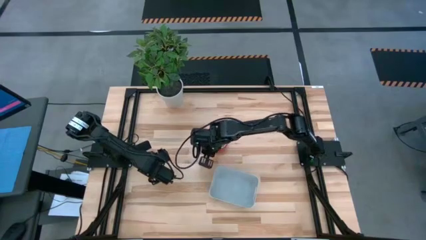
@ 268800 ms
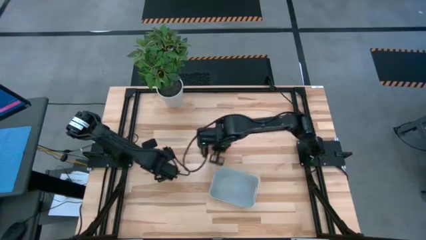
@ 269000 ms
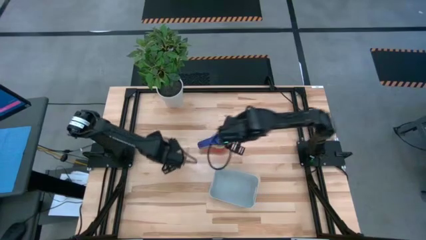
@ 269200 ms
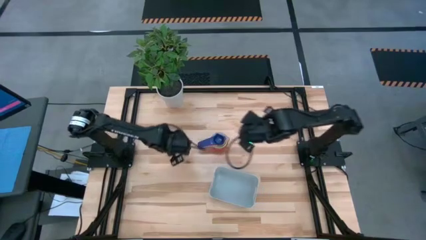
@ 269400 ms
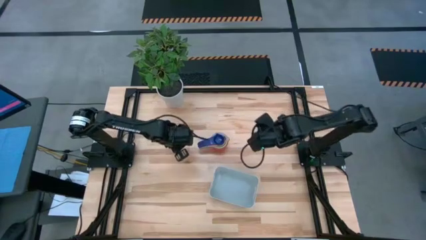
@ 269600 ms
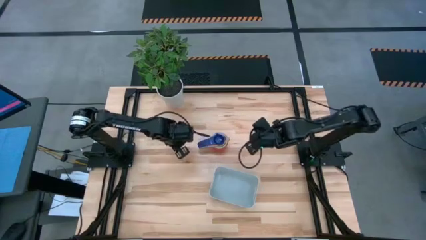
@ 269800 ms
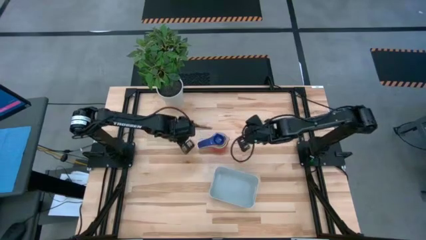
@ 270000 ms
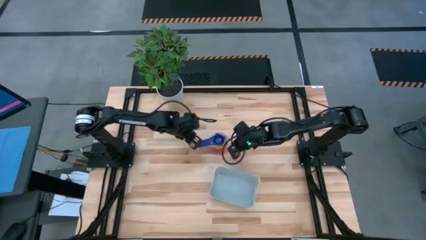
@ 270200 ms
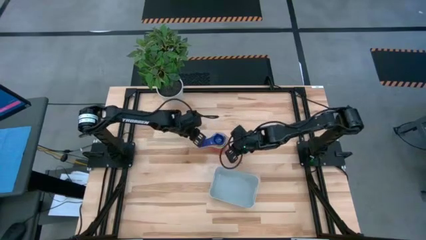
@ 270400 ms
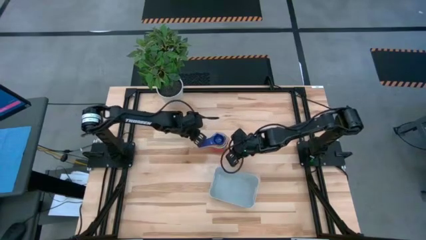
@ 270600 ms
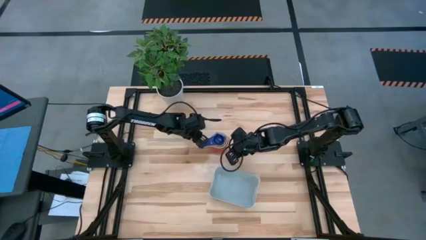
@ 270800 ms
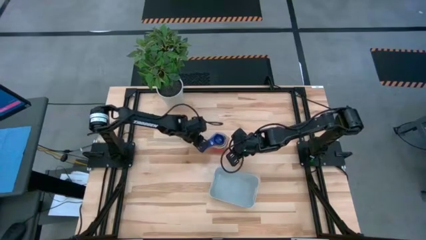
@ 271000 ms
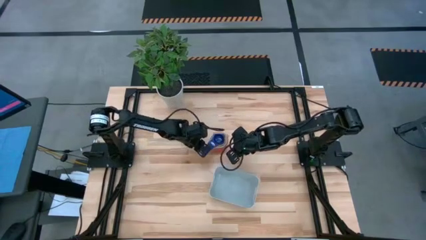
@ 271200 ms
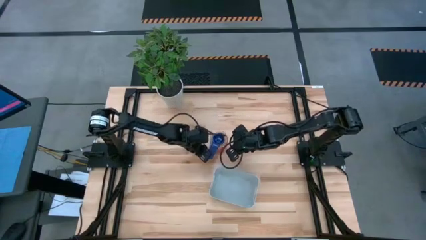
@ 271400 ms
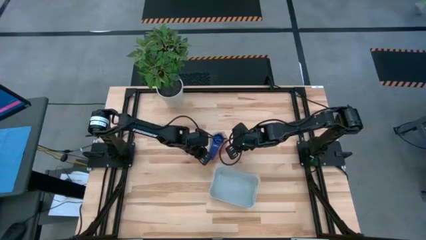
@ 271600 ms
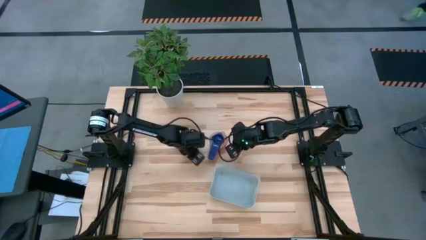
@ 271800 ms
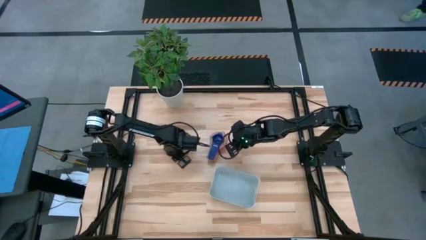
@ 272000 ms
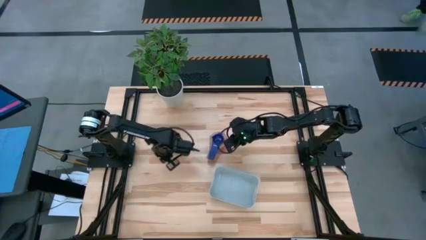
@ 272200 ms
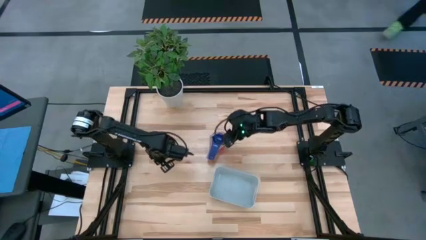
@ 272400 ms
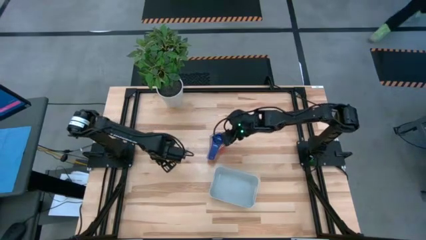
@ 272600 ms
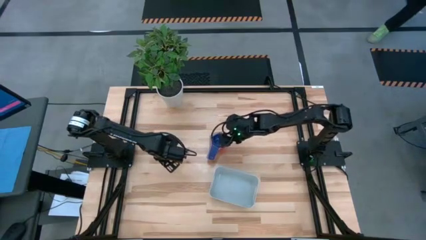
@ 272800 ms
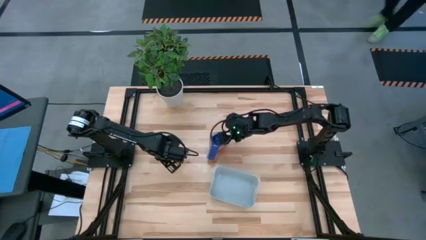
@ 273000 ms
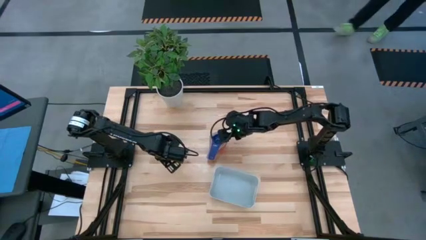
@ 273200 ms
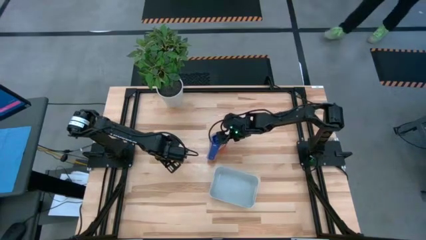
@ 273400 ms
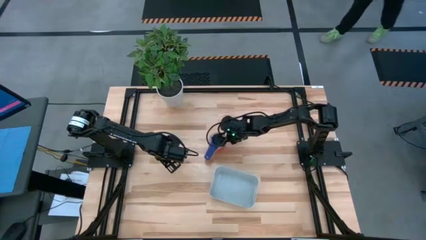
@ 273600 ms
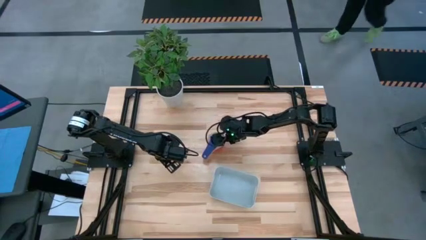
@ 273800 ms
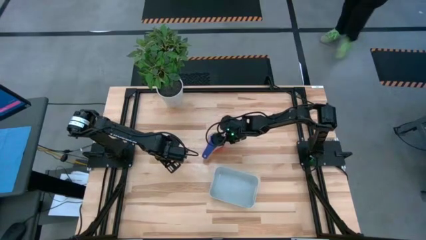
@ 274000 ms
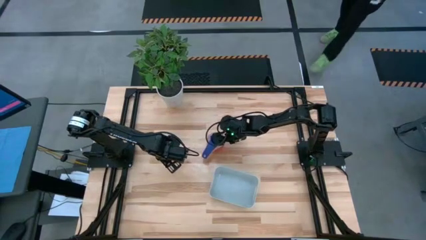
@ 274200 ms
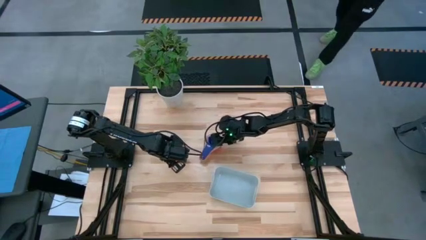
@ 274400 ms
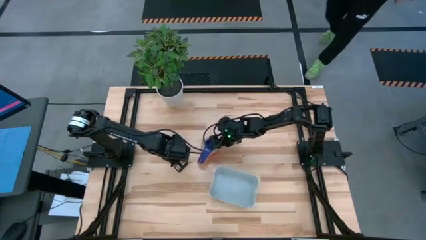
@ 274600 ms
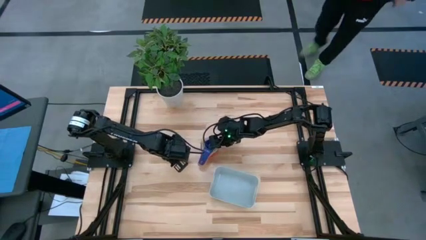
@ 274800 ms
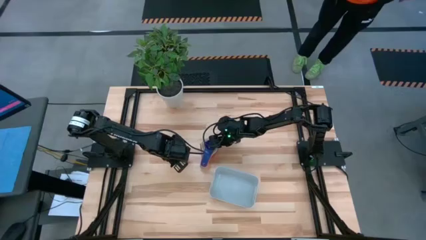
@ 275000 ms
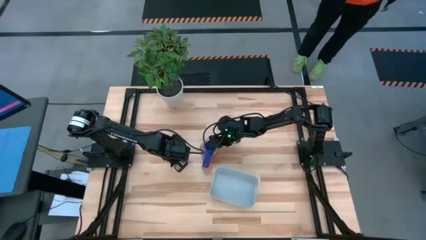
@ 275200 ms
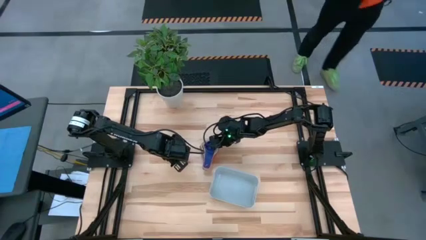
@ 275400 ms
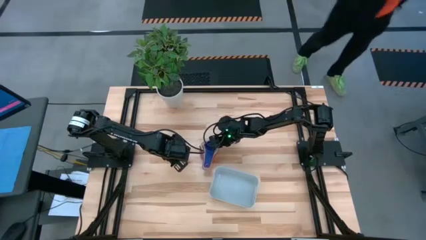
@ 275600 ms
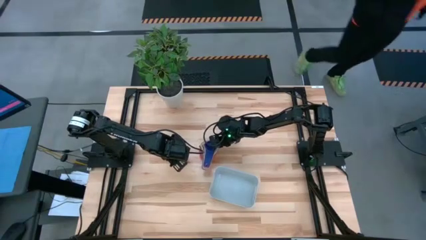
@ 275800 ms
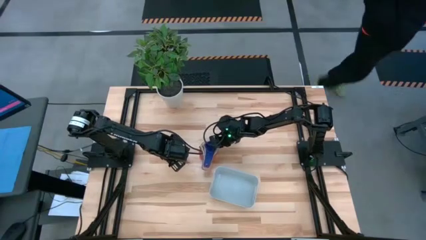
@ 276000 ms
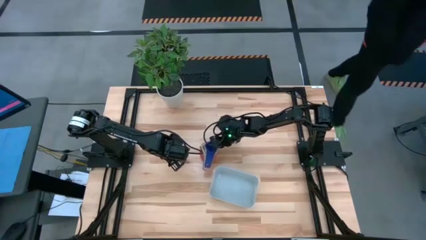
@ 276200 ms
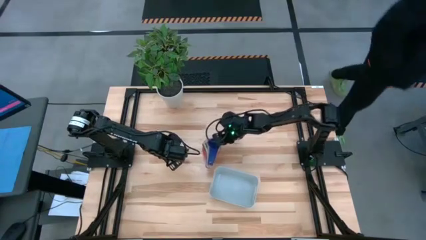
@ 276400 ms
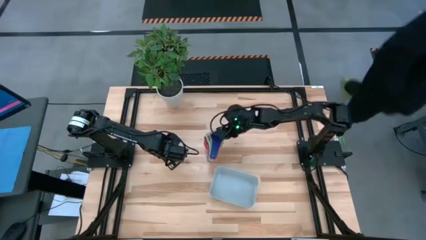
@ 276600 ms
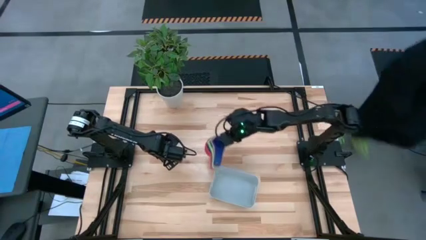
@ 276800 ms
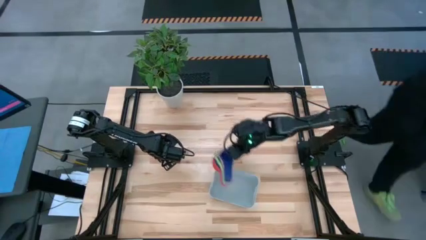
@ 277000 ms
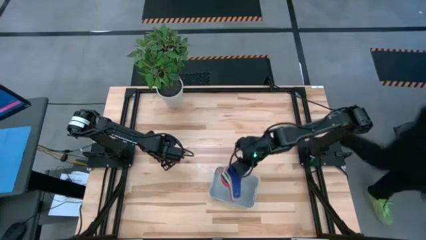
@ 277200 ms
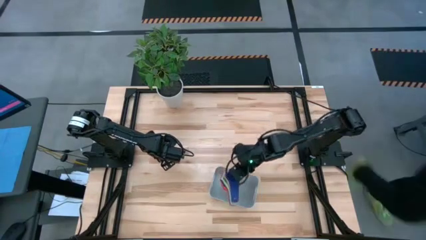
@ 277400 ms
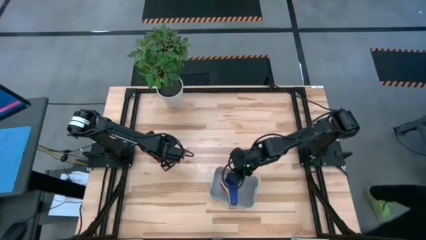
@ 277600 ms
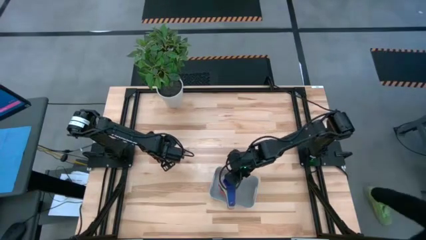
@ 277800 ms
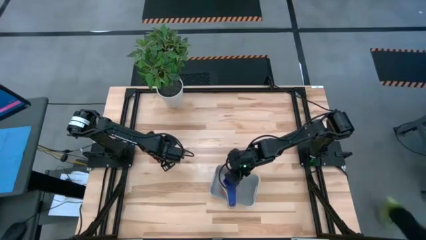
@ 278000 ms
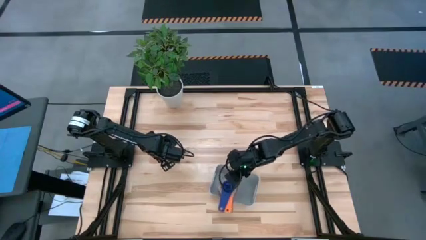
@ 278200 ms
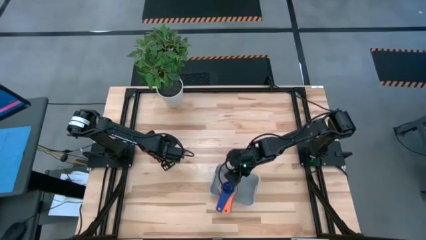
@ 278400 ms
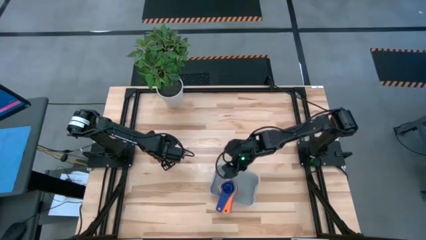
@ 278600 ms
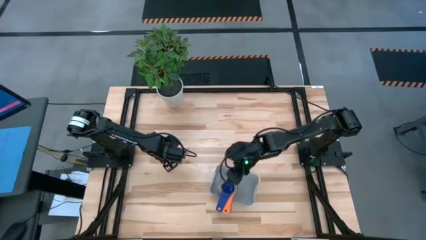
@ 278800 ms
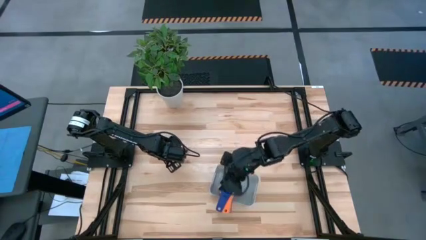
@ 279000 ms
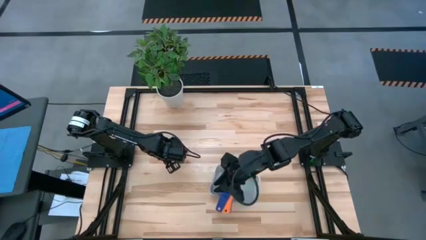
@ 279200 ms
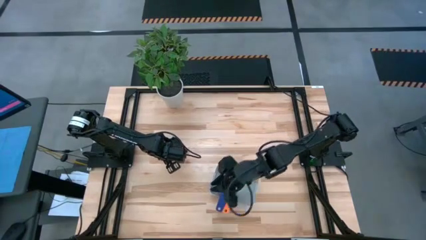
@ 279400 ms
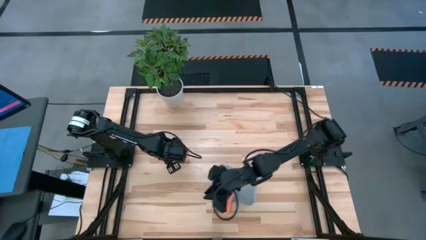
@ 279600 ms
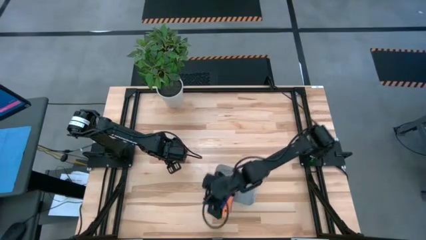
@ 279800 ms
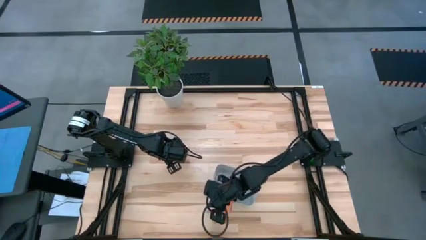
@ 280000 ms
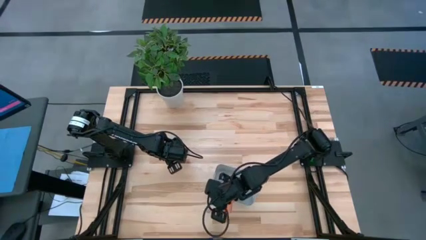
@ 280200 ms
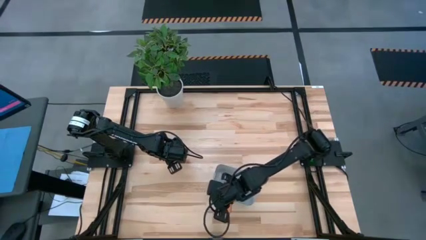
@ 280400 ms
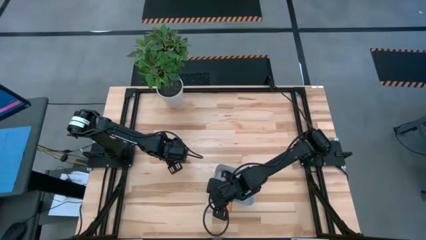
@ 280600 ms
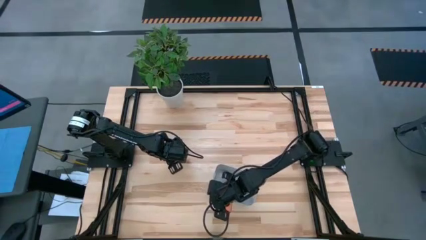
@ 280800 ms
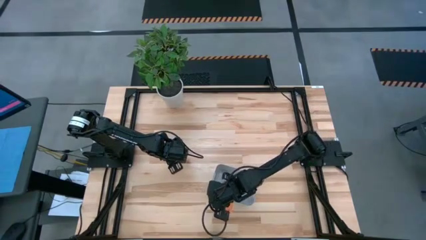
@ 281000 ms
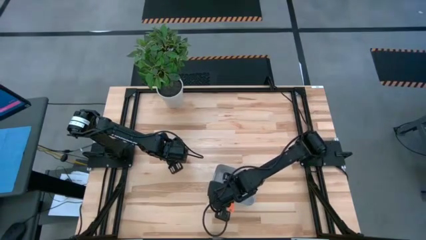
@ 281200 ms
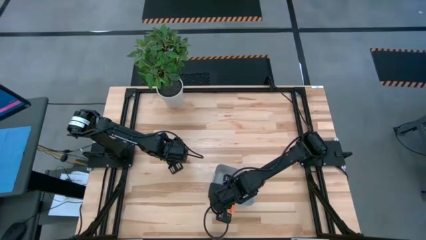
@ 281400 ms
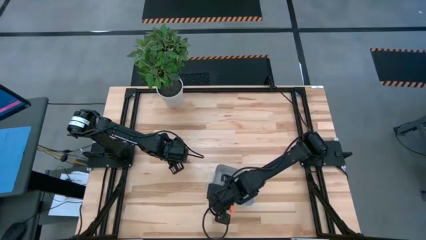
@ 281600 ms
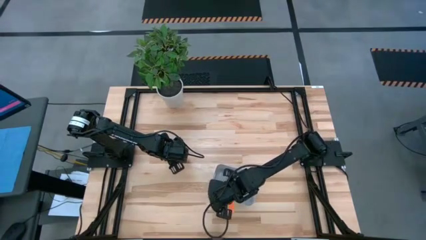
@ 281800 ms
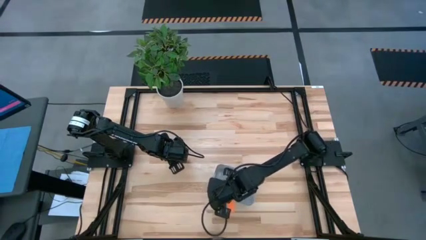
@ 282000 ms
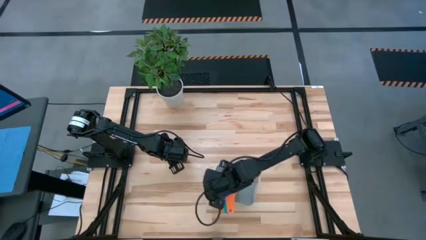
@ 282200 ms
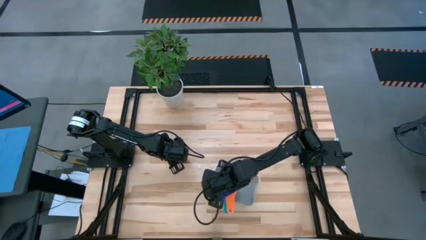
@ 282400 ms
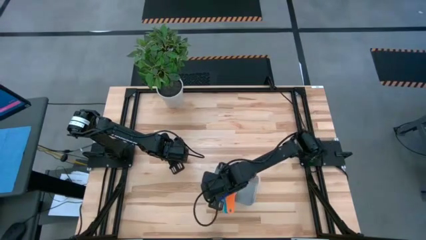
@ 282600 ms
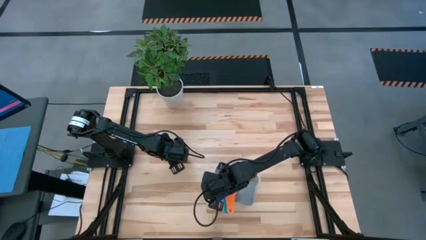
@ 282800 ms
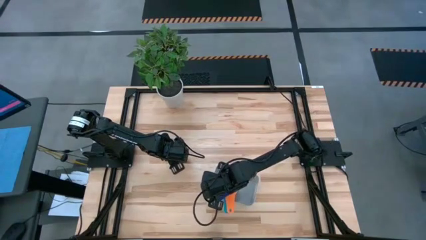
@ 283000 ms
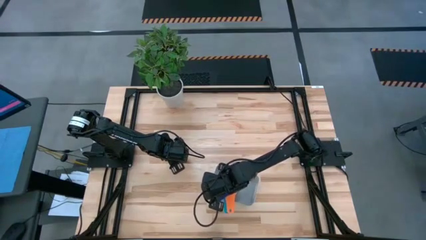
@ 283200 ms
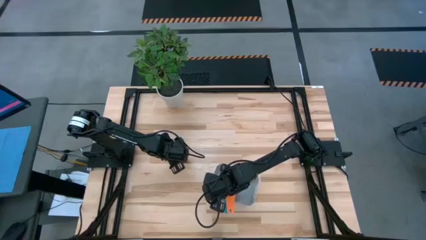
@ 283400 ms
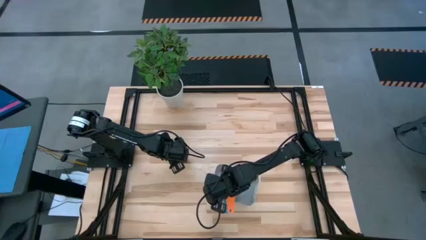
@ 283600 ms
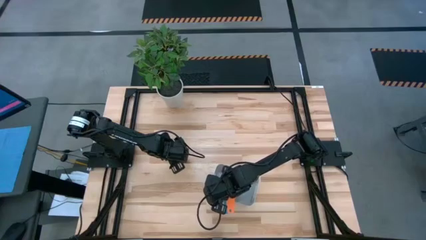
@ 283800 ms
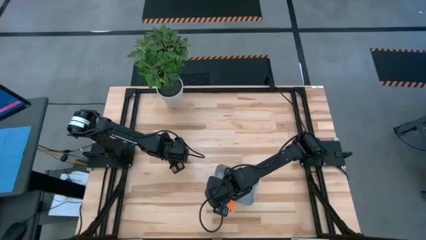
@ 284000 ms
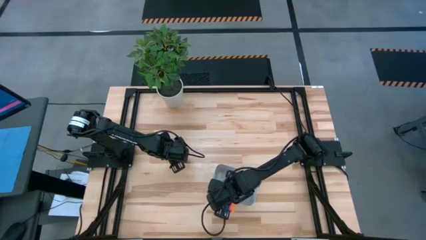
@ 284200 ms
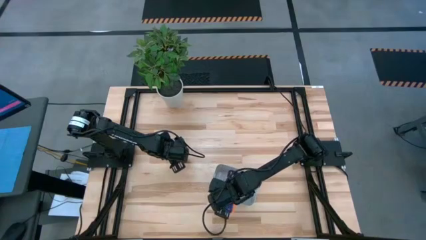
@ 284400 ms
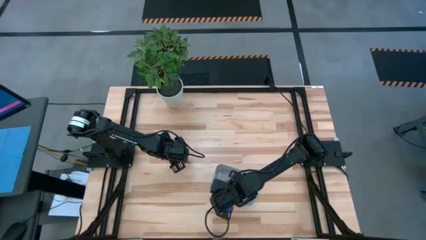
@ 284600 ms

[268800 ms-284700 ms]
Task: Nest measuring cups in basket
Put the stacked measuring cups into the gray bin

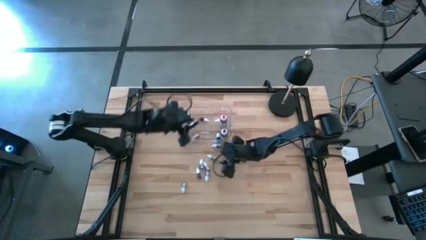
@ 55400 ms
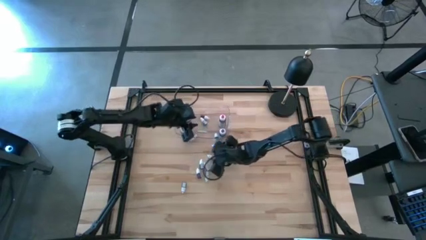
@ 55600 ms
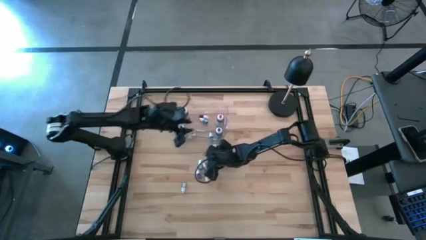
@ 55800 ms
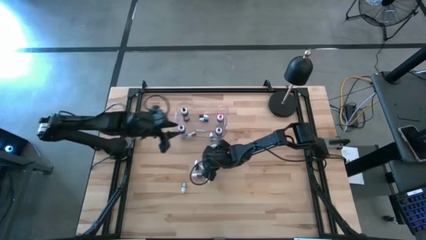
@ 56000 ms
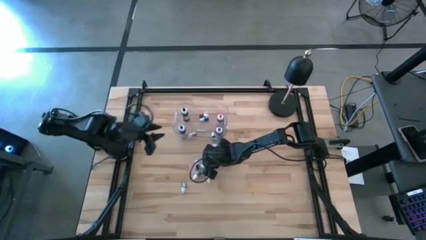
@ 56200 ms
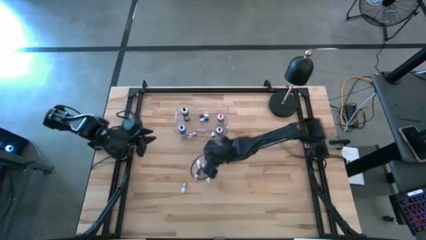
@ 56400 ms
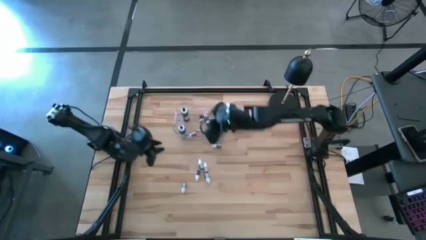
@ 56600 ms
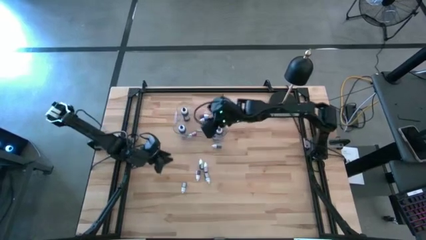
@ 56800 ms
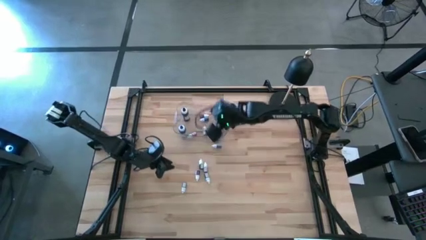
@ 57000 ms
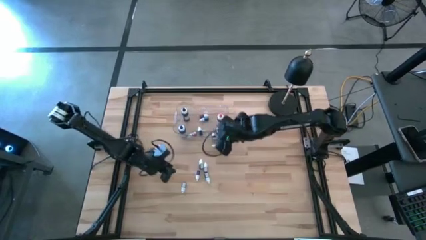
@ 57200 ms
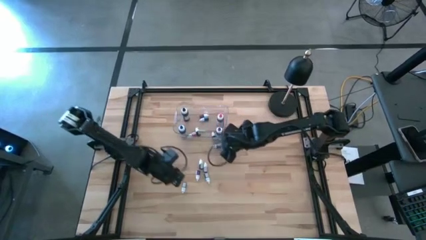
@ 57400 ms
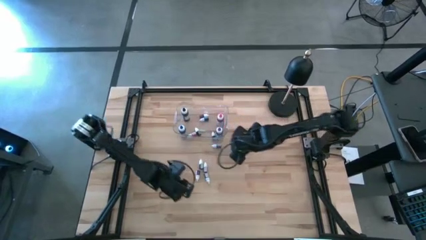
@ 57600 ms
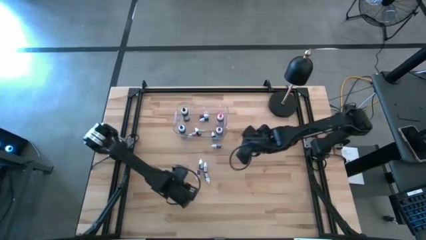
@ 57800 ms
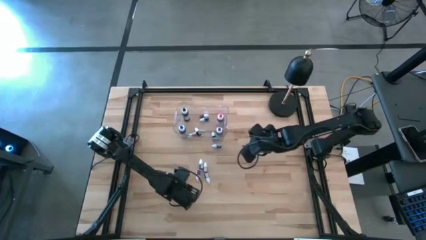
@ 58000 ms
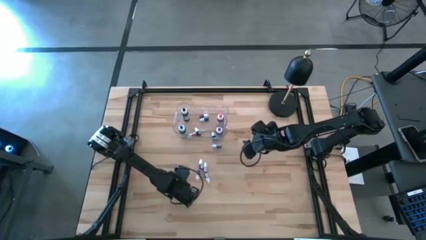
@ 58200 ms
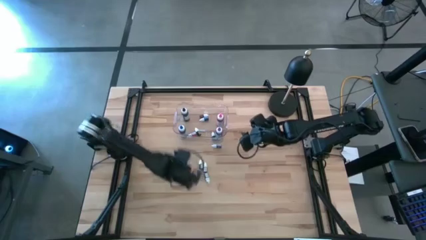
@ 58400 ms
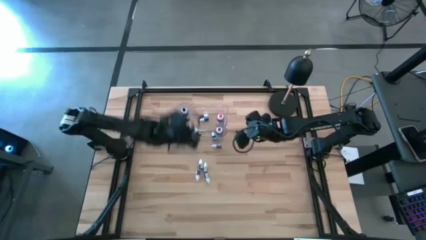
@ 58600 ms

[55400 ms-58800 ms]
Task: Pick & Place food coloring
Put the small violet food coloring bottle into the transparent bin
